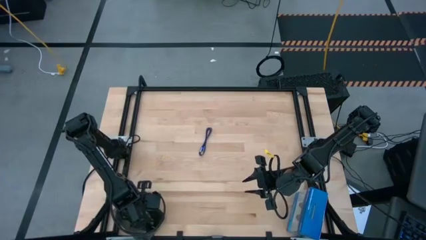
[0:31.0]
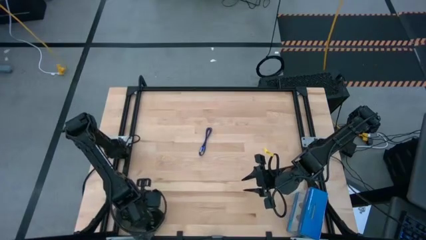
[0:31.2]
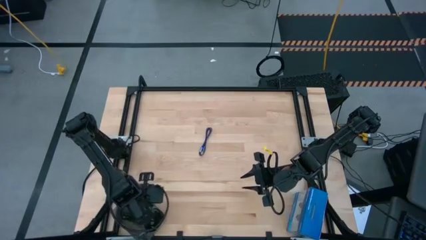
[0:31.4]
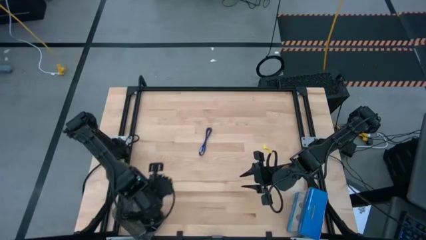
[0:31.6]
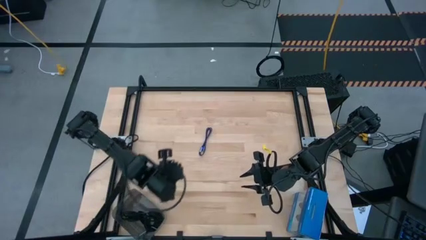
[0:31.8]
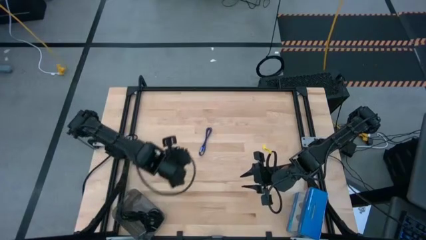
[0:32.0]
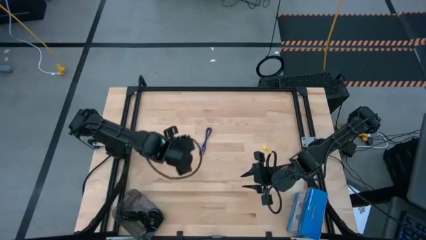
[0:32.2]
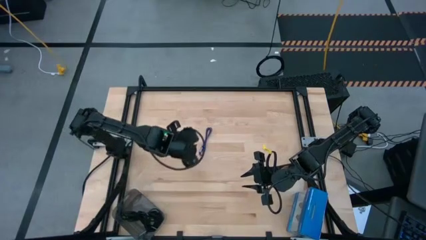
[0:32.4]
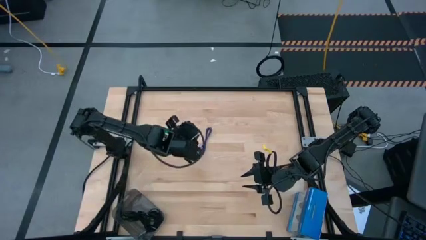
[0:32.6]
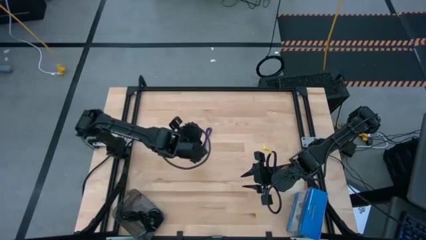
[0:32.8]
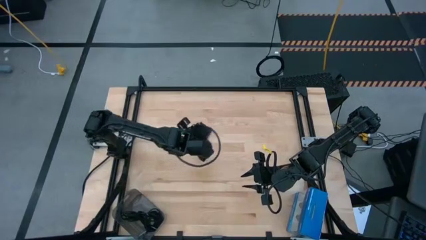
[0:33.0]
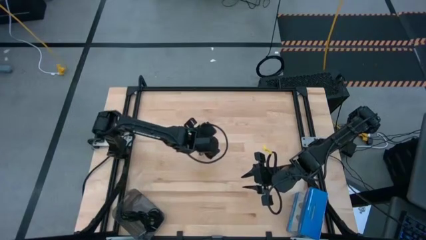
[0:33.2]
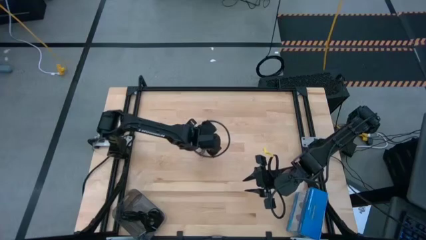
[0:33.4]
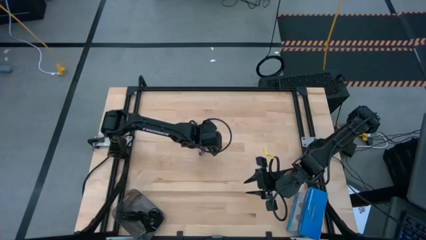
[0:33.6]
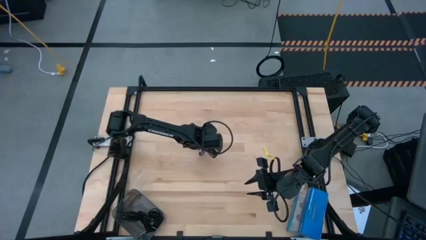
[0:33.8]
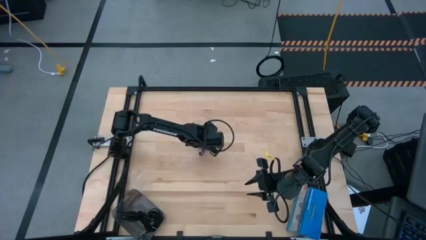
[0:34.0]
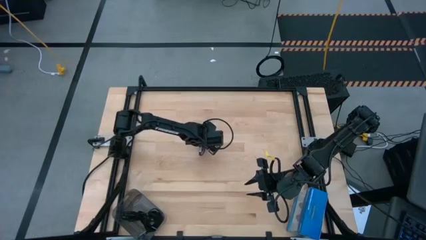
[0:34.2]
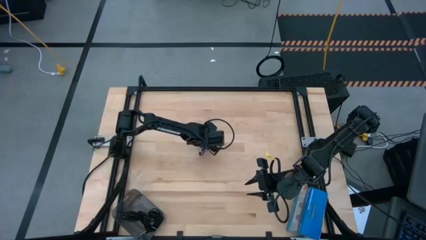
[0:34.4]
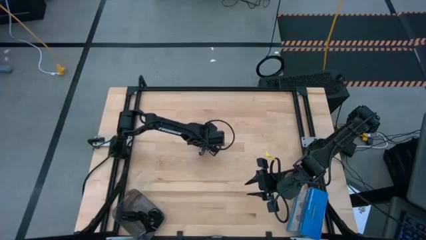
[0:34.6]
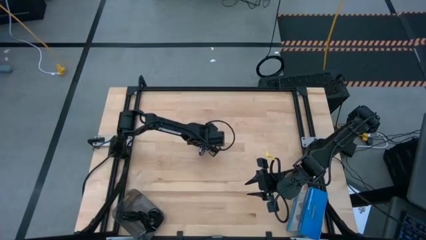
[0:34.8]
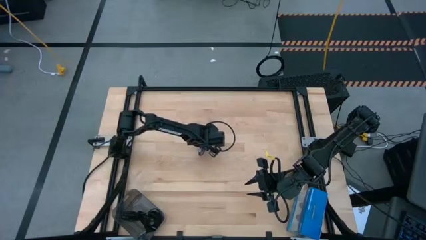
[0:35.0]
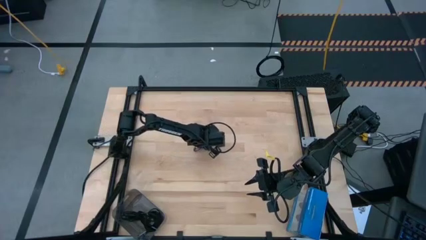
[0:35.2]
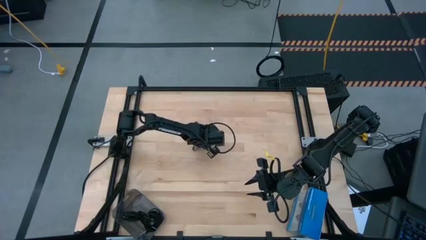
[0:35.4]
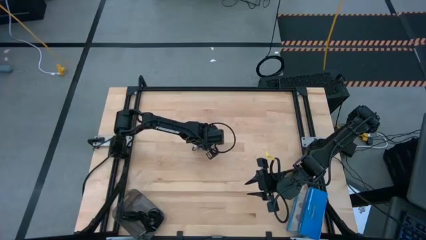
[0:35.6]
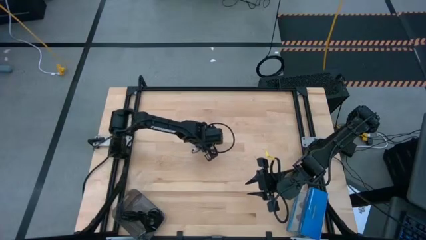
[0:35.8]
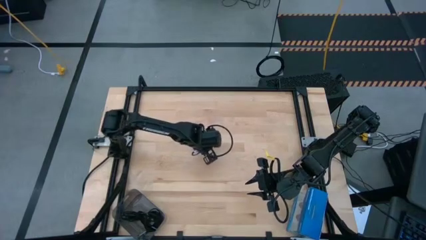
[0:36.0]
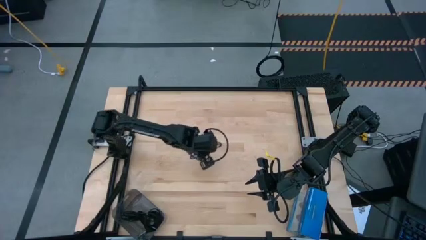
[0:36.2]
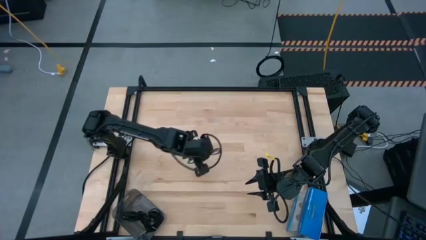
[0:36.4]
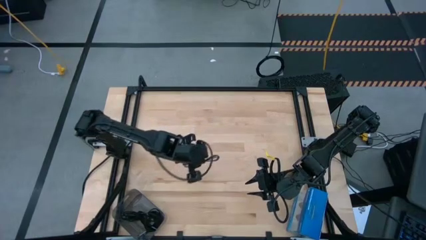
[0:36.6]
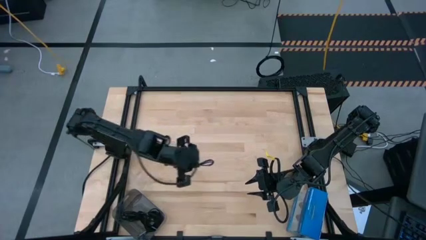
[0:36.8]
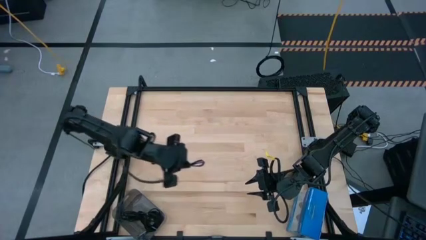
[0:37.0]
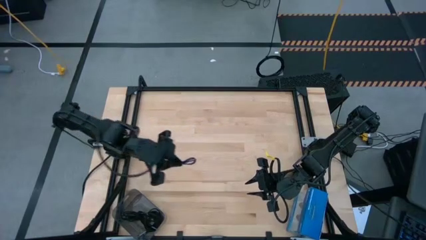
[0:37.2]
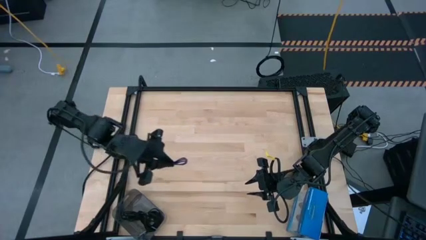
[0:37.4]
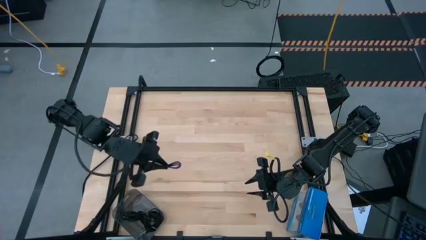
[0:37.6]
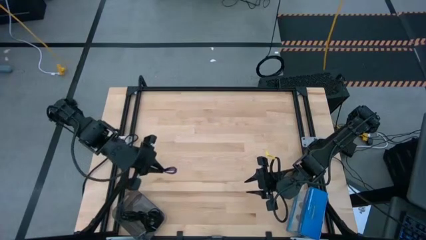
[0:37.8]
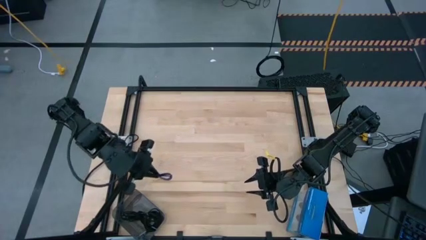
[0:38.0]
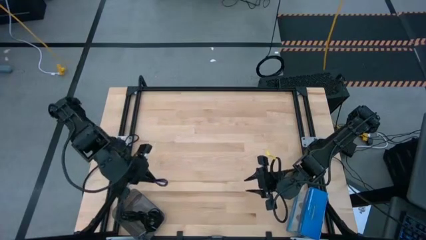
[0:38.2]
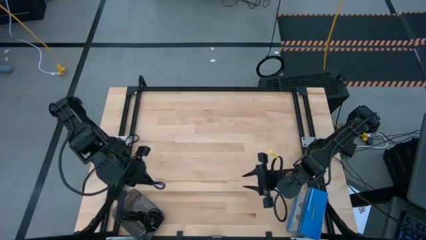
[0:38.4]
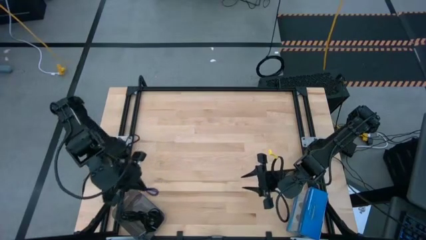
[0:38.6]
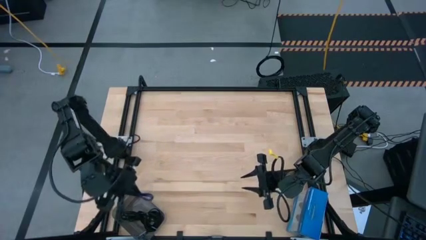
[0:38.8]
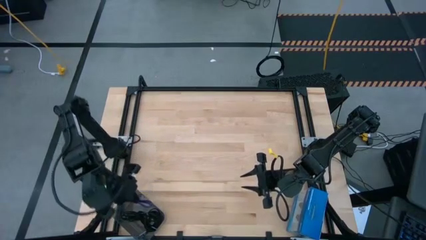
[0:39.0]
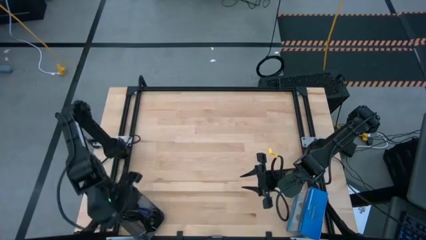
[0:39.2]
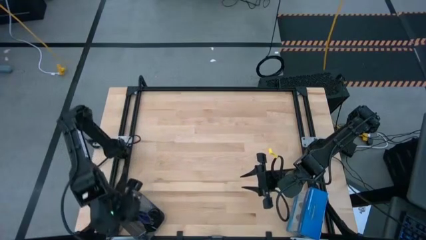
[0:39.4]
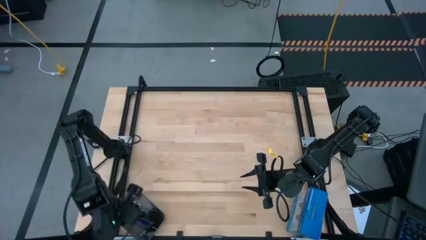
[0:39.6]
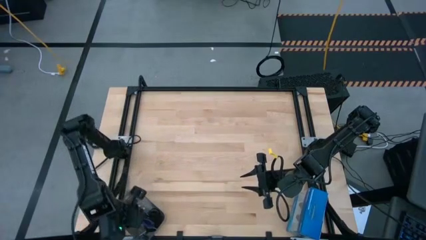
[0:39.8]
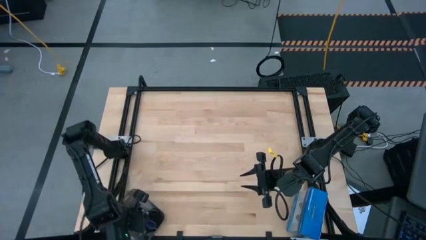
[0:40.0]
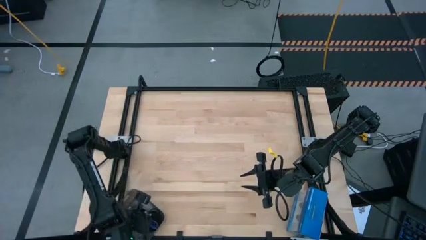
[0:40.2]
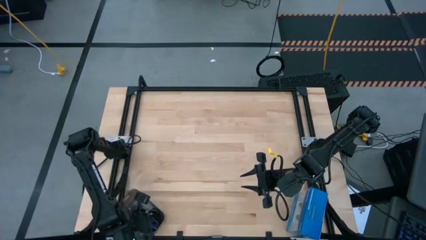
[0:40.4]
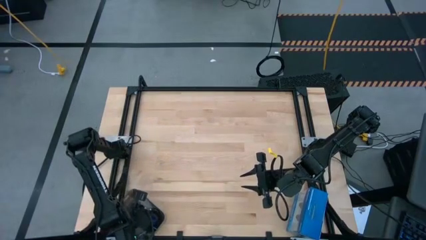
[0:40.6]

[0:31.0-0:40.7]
Task: Pick and place USB-C Cables
Put the blue charger cable into the black bin

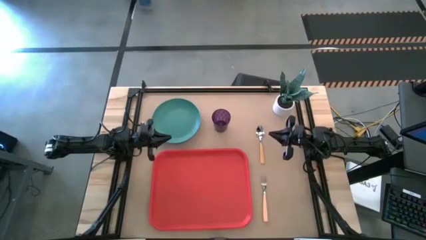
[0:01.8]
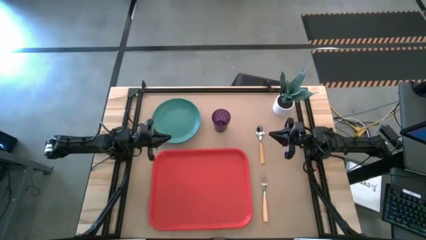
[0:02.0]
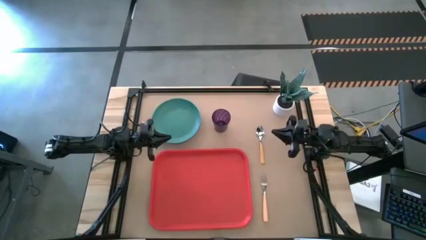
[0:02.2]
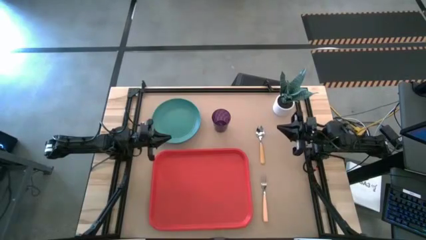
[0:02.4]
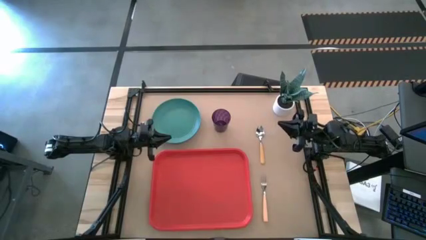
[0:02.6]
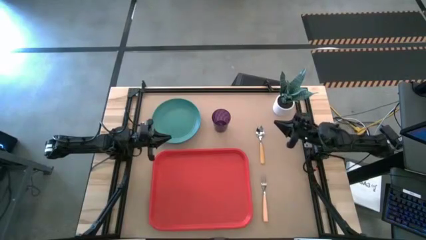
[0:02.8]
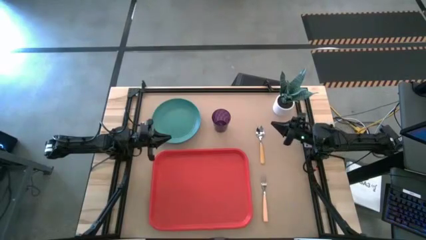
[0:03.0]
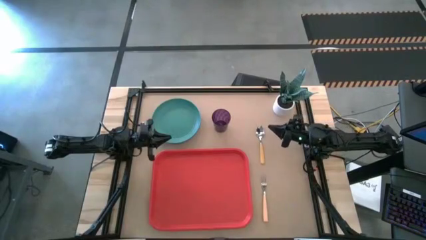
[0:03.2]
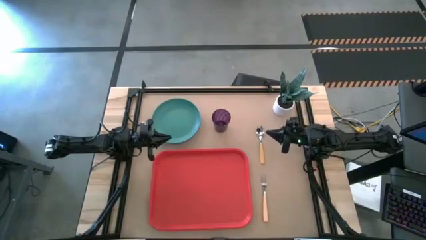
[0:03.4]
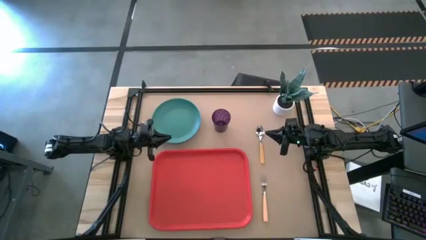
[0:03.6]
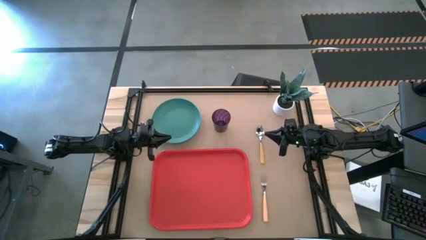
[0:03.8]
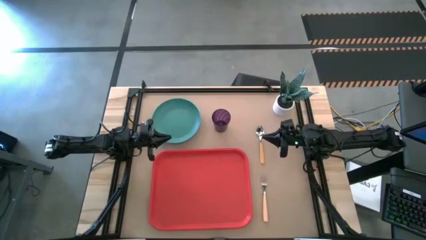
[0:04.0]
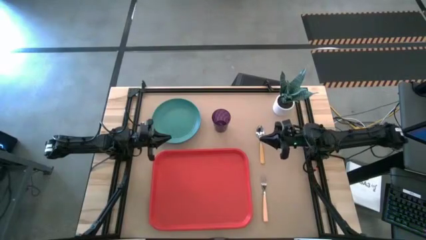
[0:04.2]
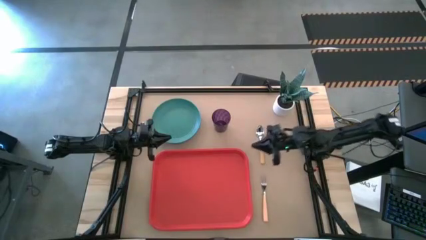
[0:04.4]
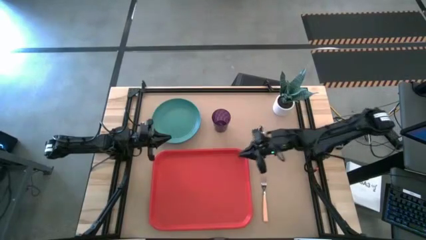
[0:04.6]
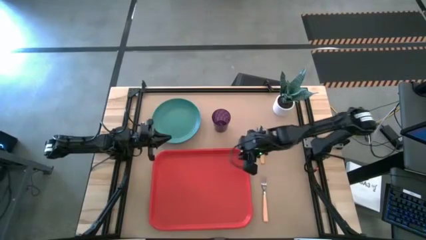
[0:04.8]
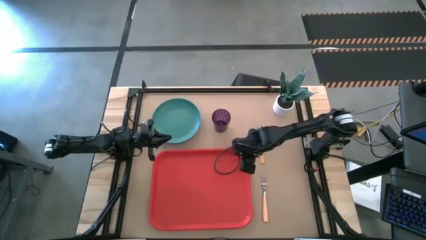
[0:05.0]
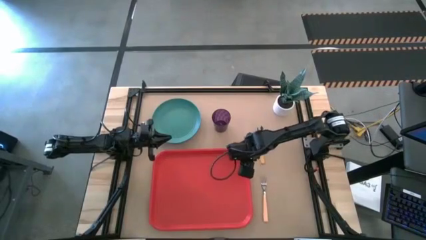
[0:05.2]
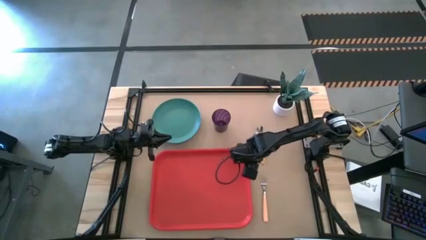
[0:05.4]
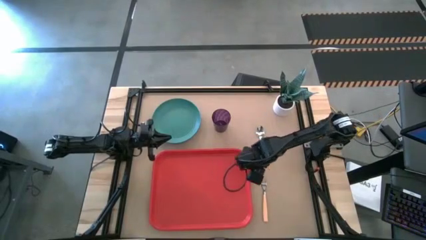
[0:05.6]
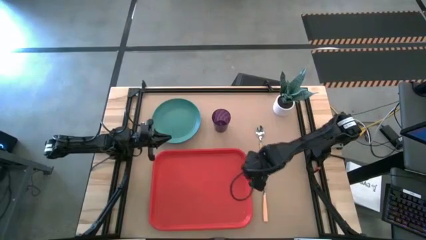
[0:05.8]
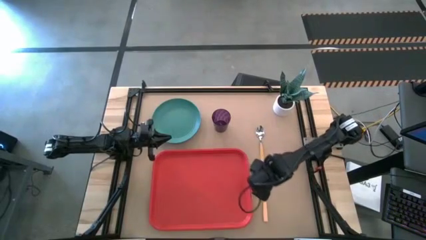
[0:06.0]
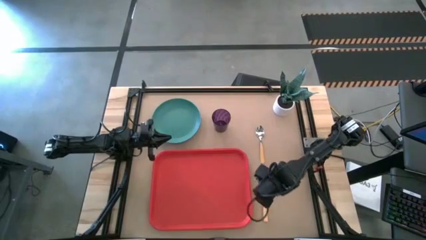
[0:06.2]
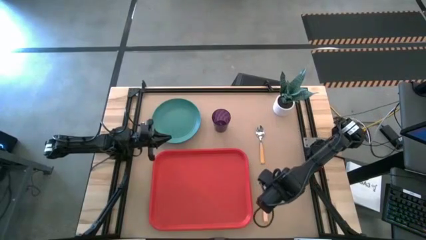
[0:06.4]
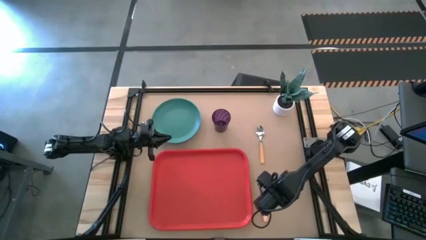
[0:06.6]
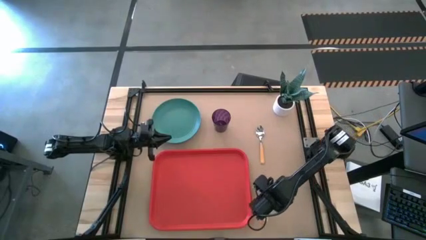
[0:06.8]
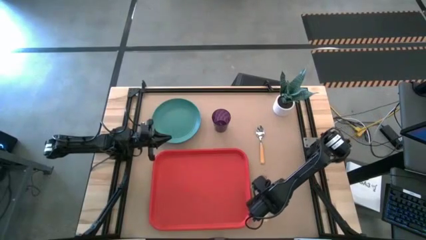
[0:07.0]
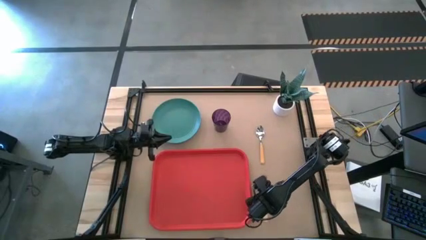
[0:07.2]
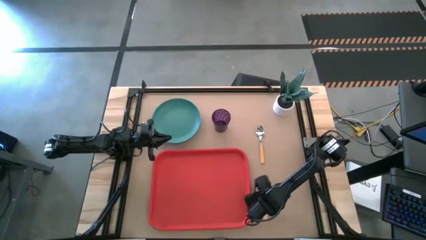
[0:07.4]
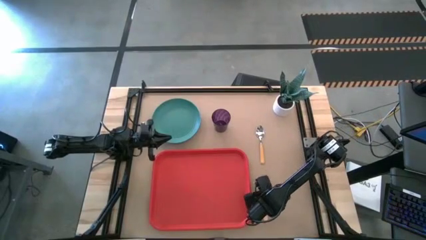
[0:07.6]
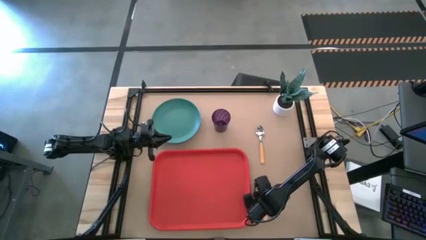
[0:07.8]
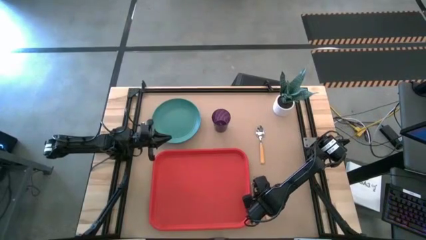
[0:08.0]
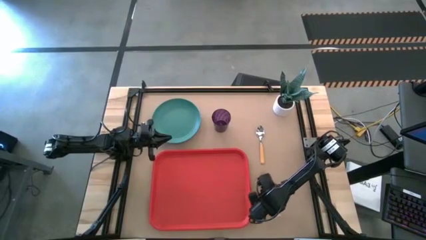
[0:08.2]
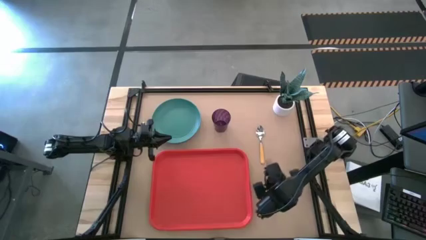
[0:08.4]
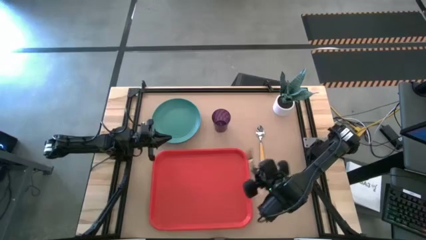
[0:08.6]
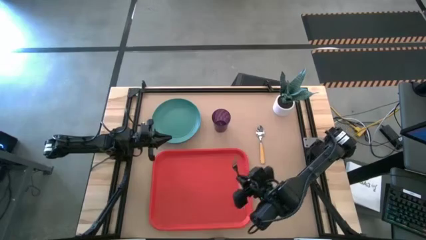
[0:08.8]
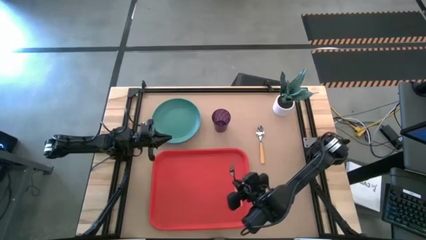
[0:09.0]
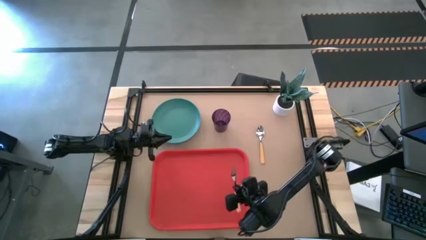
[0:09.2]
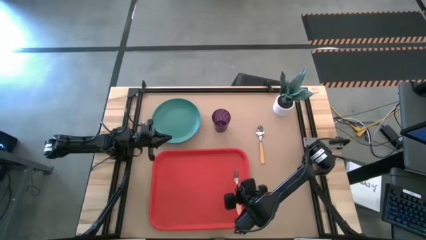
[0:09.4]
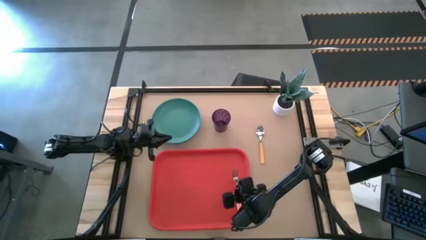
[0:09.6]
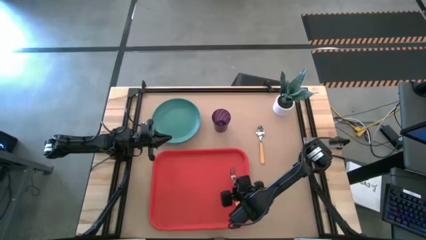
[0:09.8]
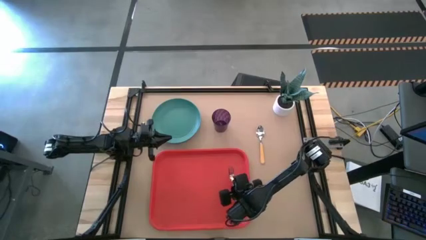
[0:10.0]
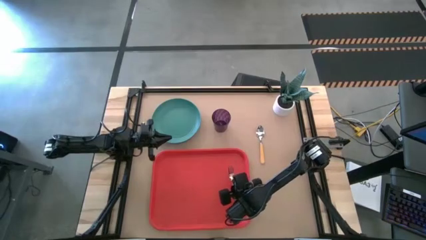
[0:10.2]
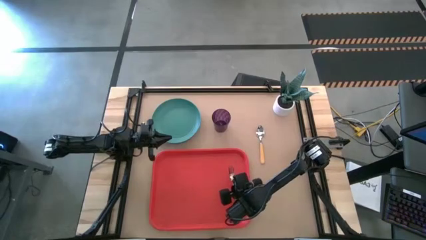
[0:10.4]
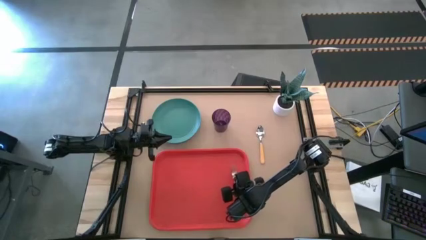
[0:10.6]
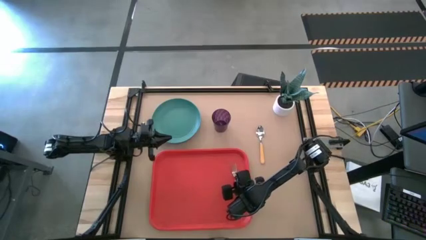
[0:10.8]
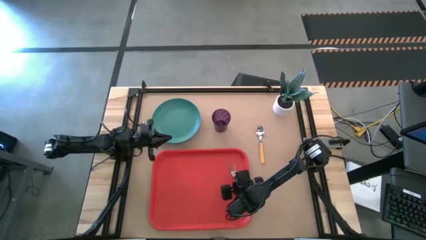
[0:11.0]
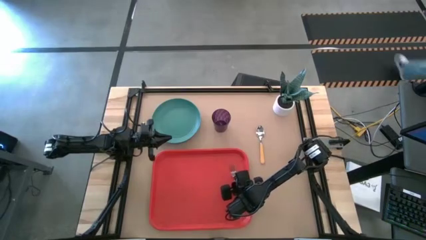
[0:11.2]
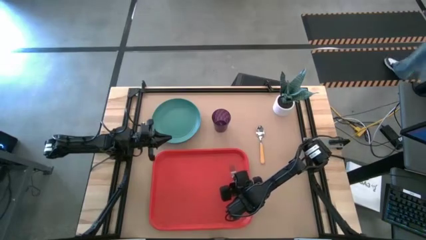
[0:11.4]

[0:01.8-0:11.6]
Task: Pick and place plate/cup/fork/spoon on tray
Put the orange fork on the right of the red serving tray
